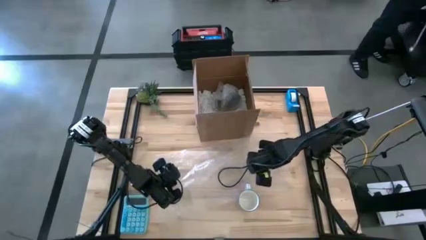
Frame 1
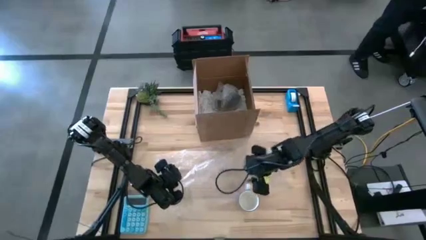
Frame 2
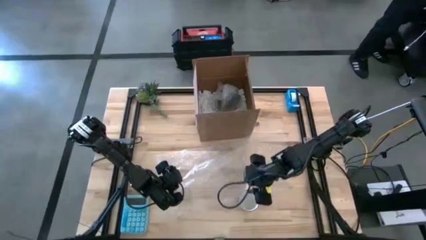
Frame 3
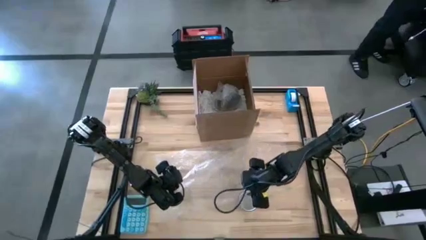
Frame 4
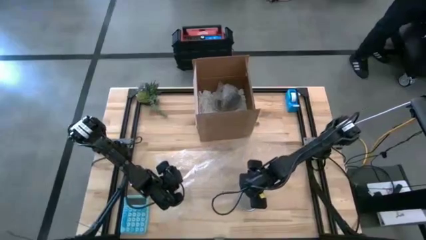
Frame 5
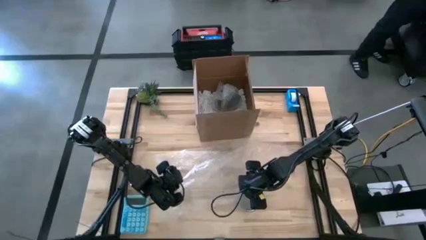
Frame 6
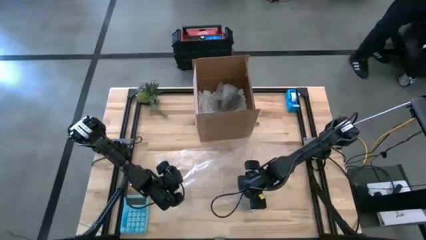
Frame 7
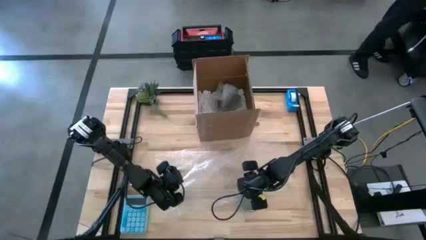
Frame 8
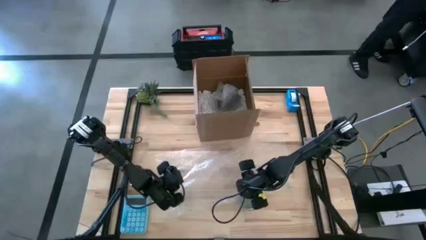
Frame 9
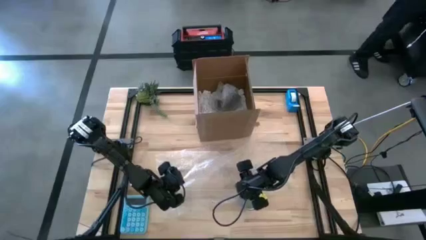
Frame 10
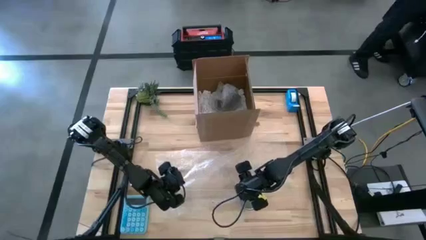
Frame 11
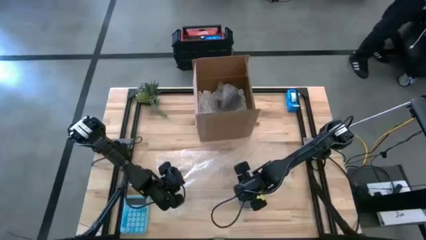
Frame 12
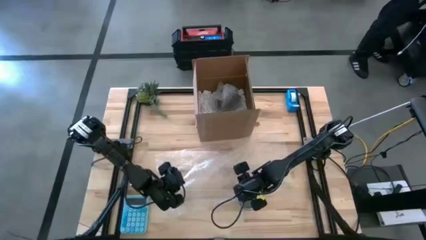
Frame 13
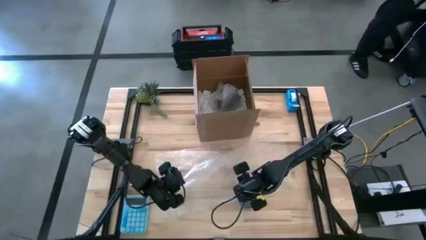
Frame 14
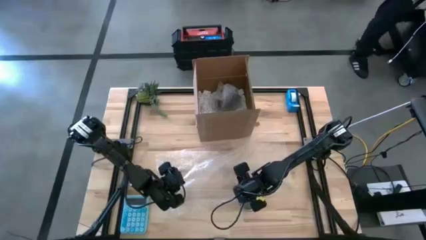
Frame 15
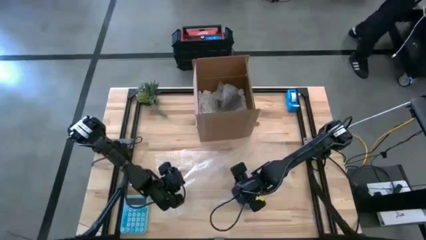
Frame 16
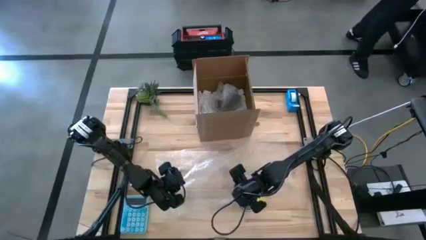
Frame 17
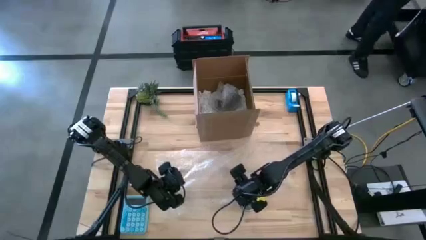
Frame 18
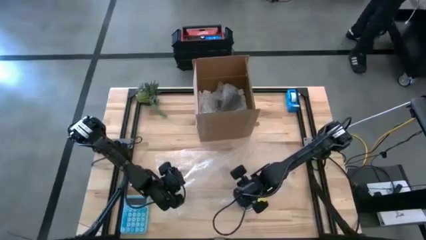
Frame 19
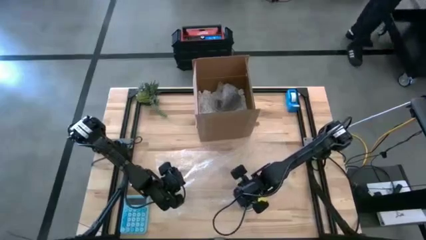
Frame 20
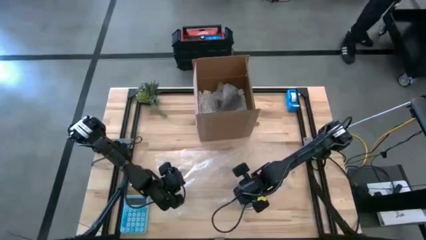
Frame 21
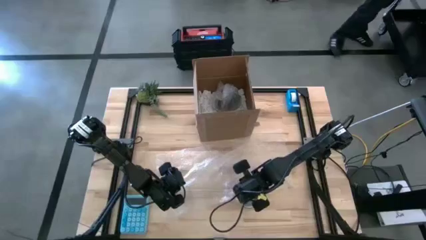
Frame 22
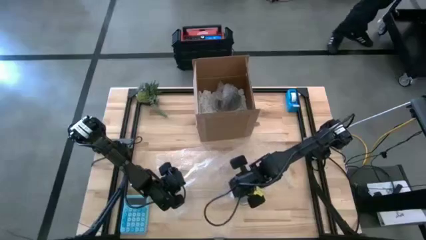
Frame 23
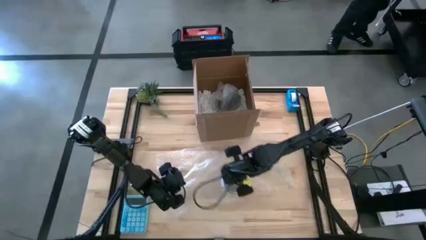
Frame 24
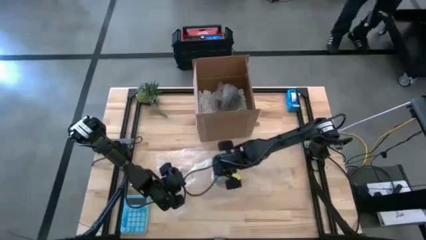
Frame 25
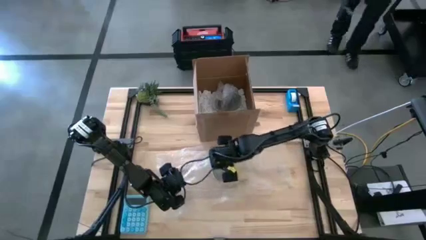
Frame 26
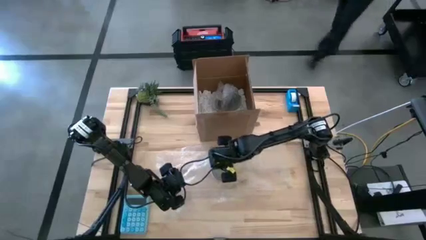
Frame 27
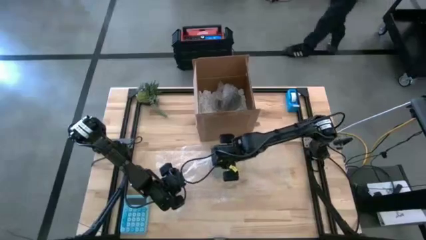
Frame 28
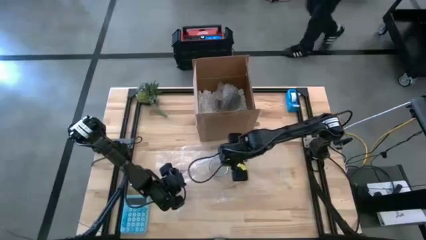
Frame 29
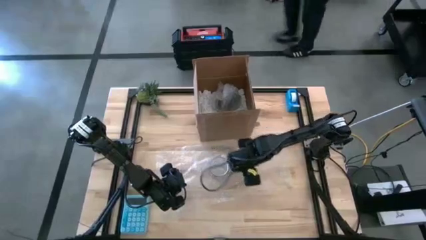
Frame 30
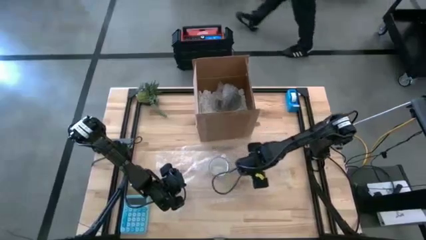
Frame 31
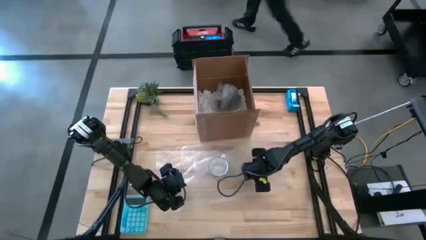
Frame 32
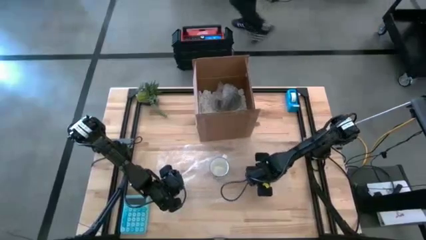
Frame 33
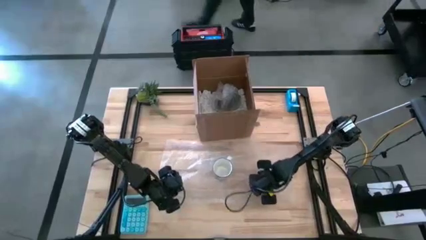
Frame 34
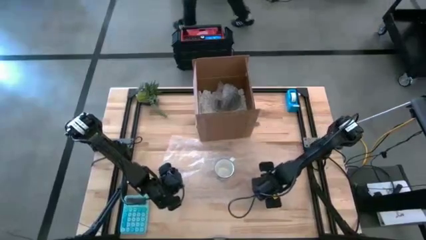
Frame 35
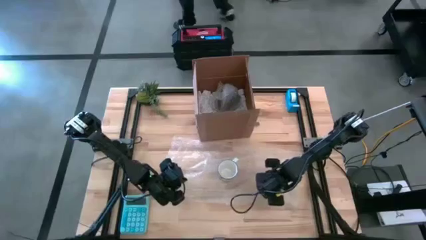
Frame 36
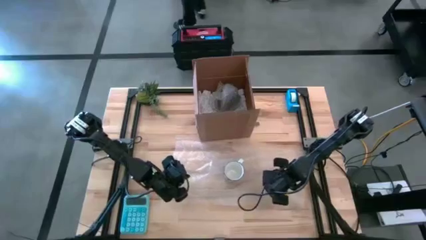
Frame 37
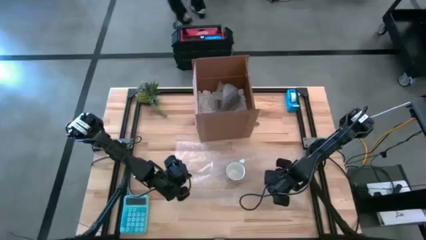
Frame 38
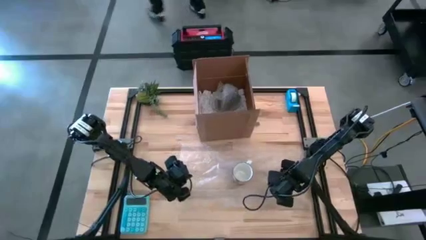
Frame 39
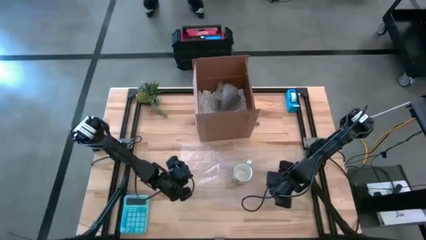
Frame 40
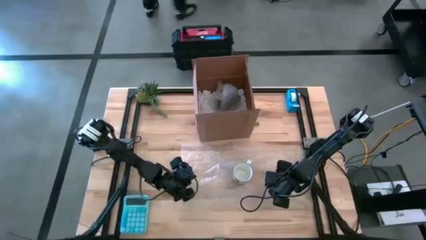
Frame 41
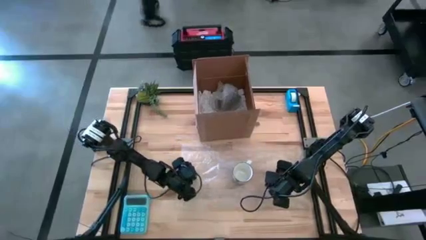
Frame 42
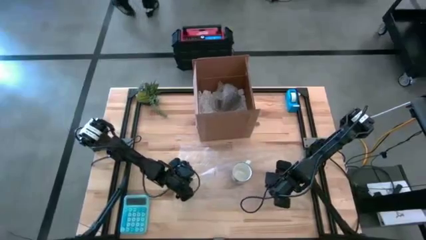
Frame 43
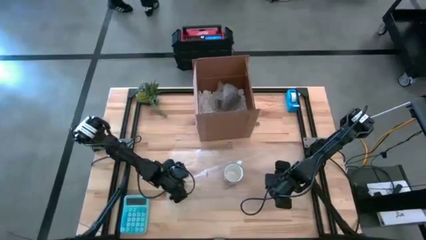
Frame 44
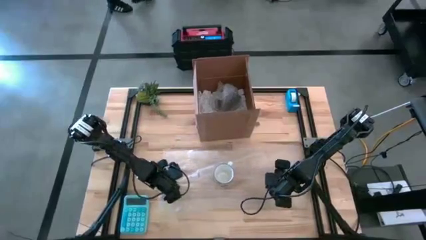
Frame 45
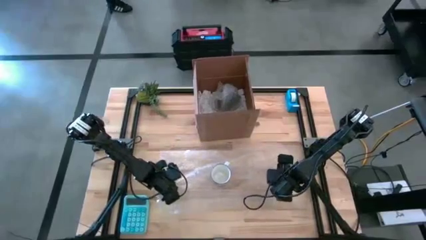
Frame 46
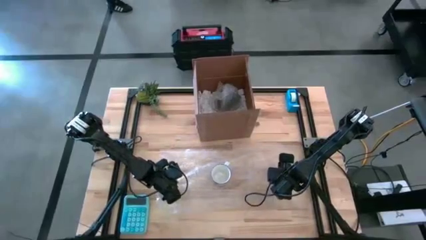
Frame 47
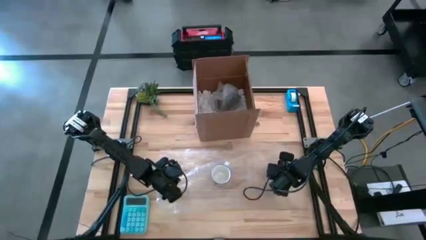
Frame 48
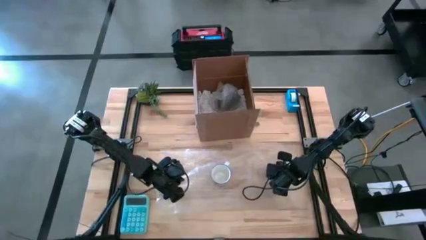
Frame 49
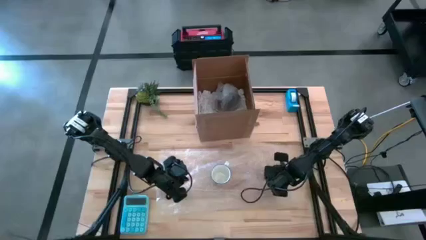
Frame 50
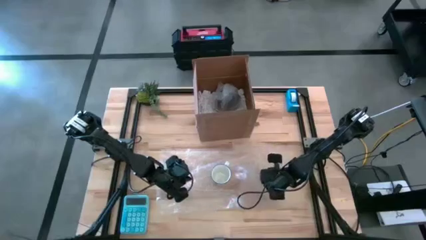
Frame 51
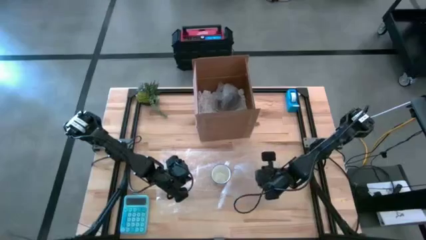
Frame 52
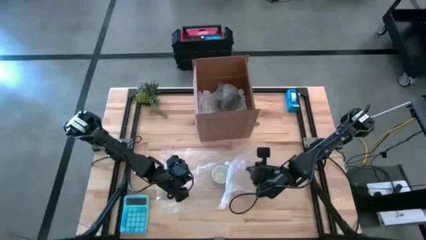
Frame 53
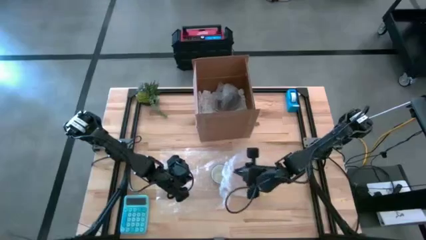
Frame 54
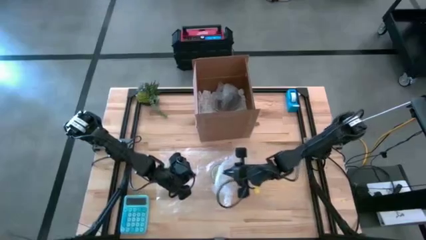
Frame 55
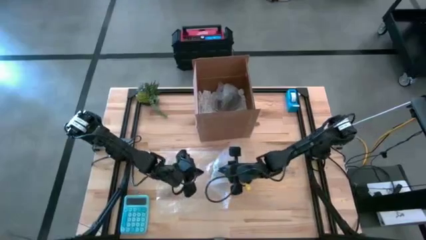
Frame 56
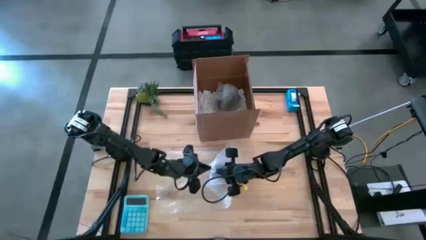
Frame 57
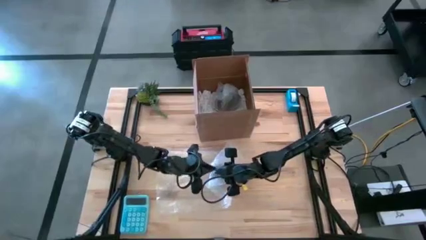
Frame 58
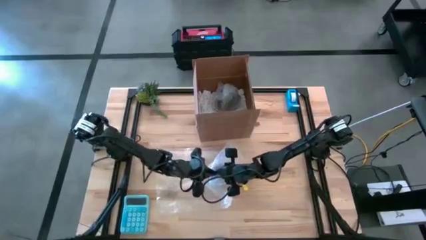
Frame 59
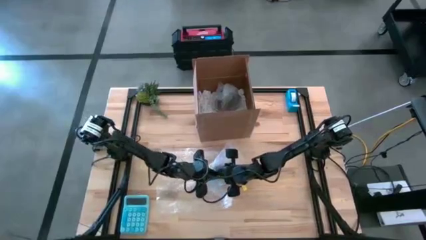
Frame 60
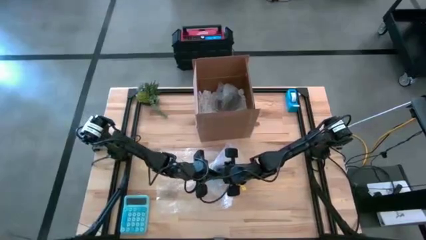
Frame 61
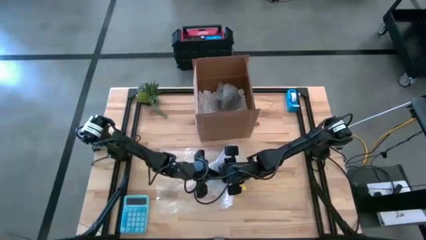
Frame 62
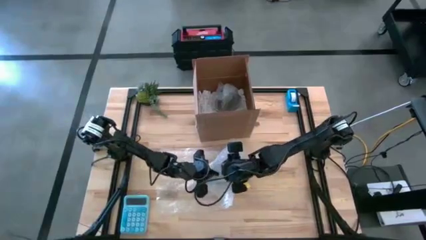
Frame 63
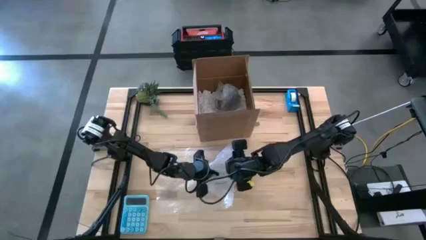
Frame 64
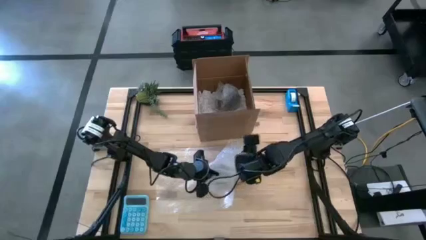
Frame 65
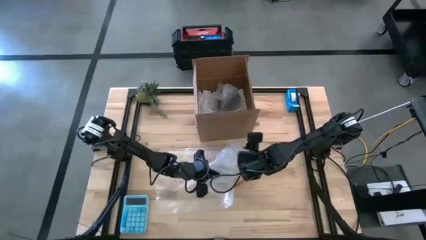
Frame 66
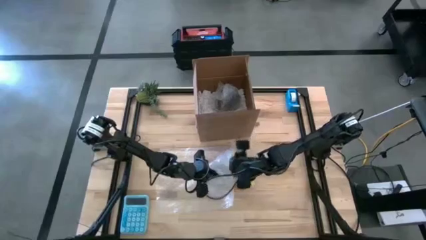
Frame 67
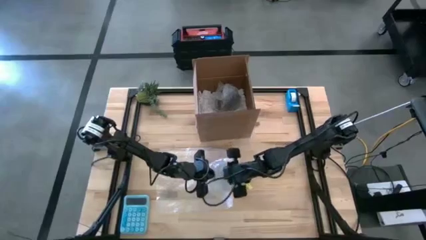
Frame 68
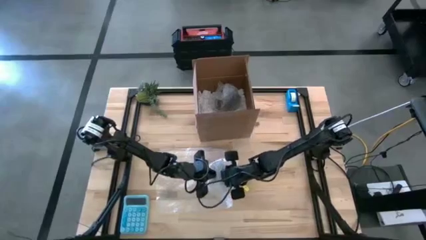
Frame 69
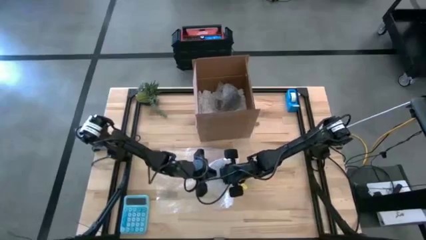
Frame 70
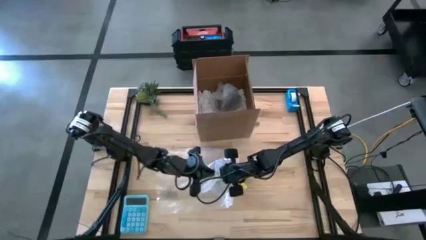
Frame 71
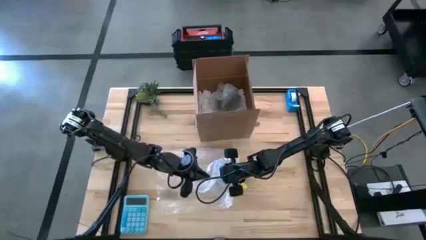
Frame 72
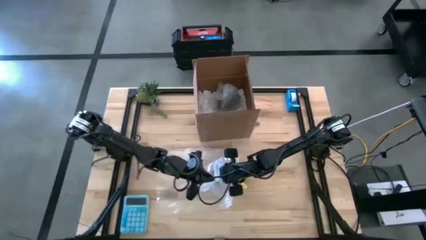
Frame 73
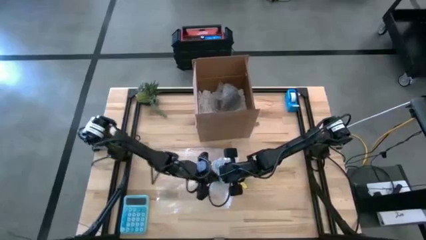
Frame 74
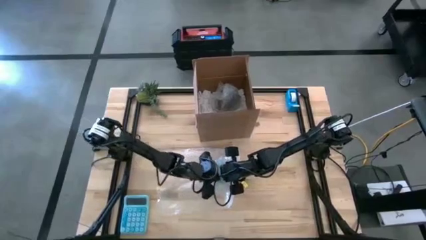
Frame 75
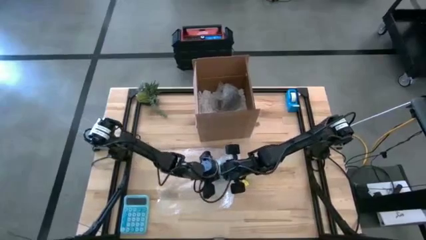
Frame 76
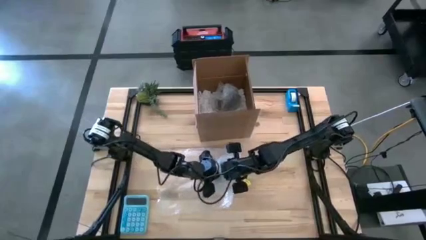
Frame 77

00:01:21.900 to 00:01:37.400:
Task: wrap mug
Wrap the white mug with the bubble wrap

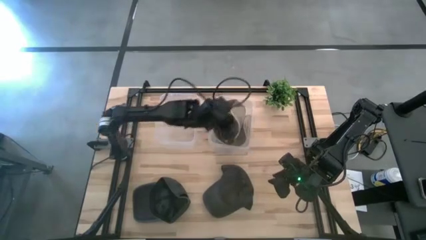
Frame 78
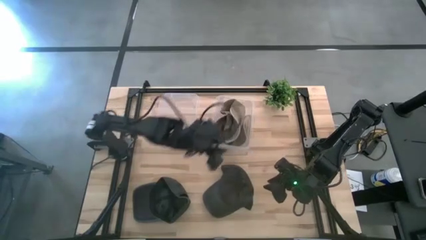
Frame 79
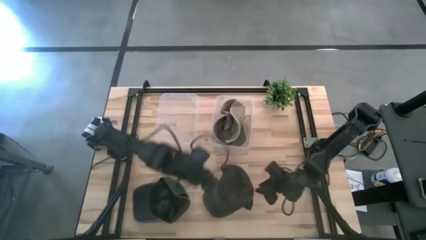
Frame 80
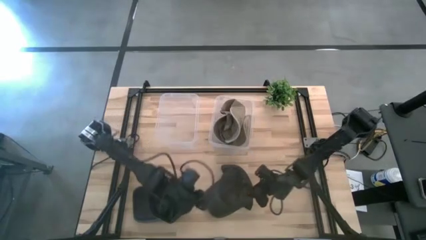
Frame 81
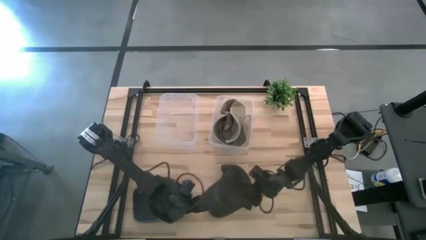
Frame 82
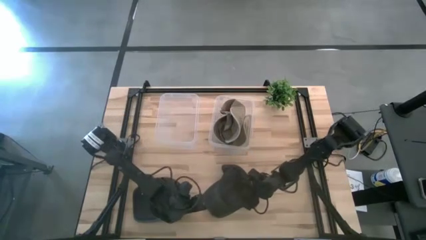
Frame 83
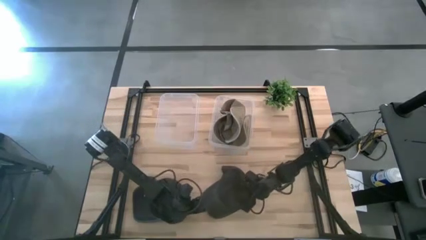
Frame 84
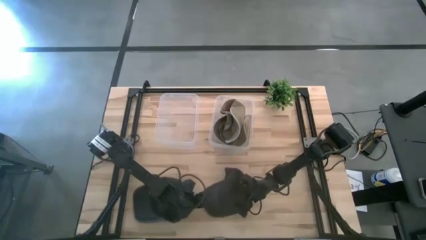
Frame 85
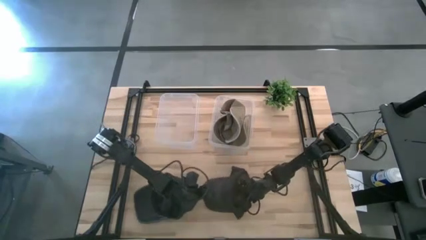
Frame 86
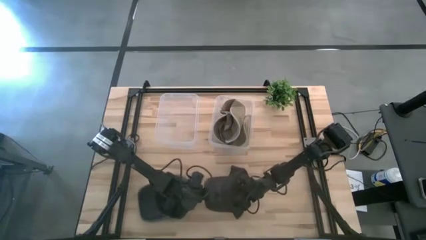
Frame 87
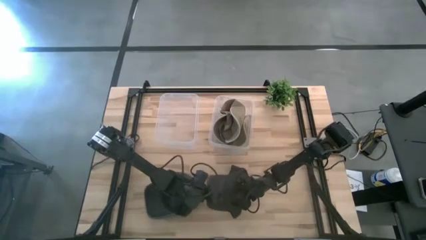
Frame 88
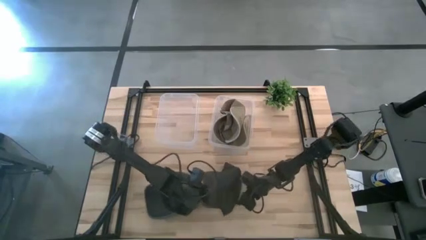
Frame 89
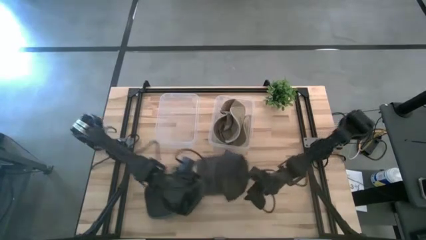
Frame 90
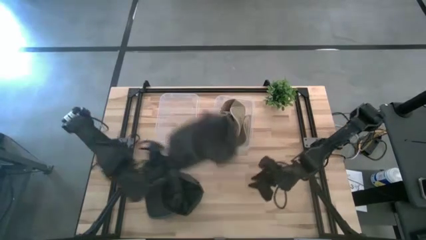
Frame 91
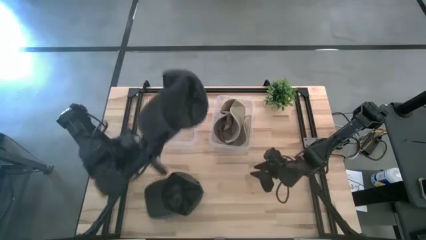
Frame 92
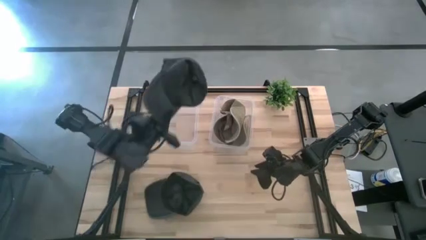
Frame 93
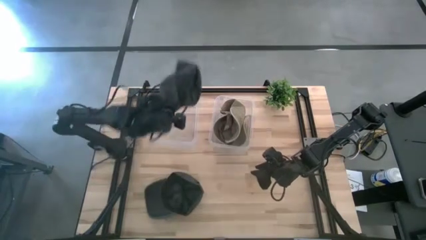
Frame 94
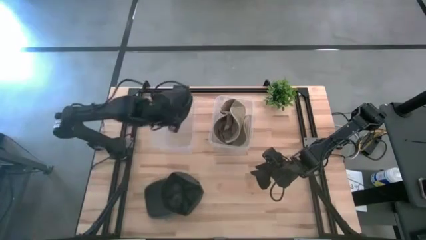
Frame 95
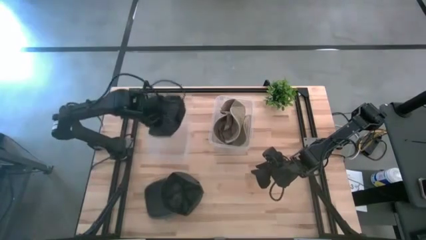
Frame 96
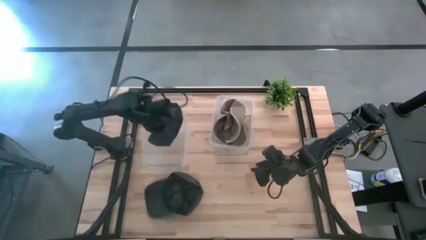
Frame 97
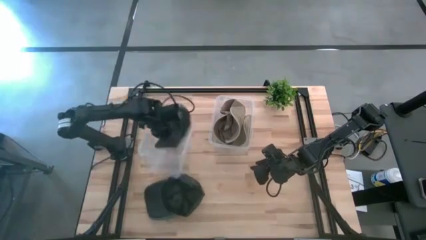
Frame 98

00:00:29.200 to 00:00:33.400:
Task: Pick & Place hat
Put the right black cap into the left transparent bin
